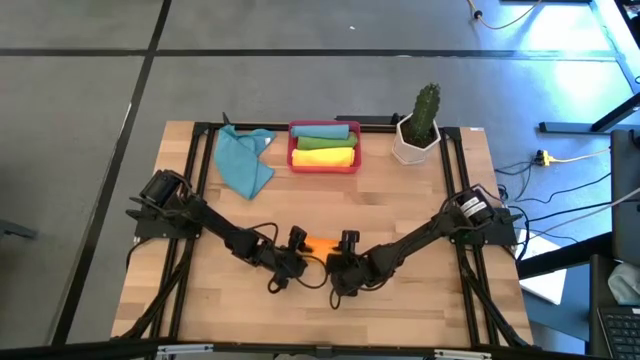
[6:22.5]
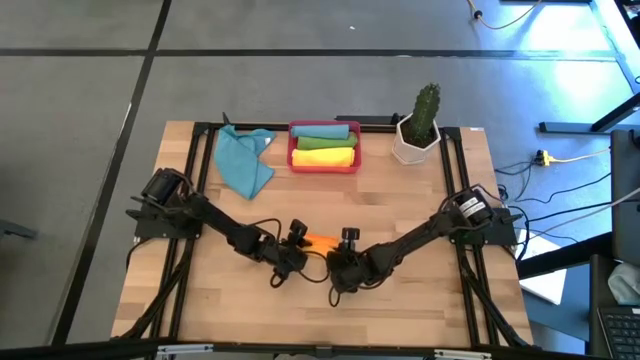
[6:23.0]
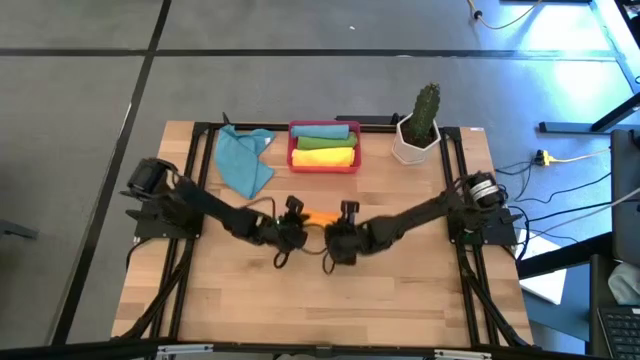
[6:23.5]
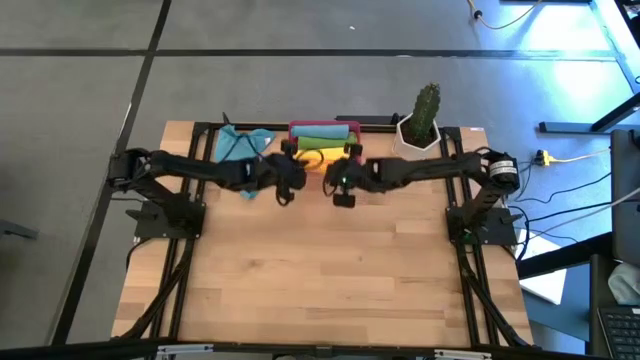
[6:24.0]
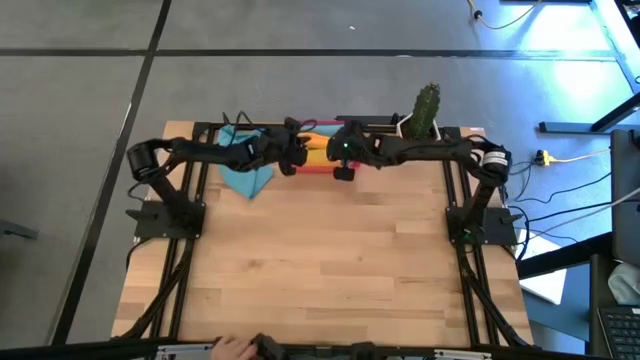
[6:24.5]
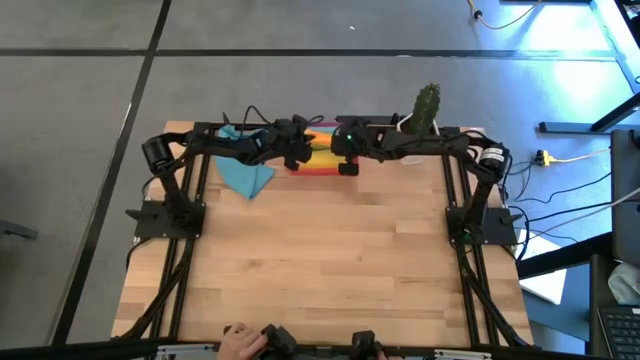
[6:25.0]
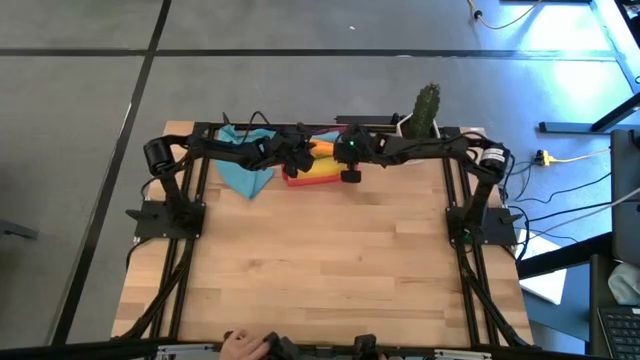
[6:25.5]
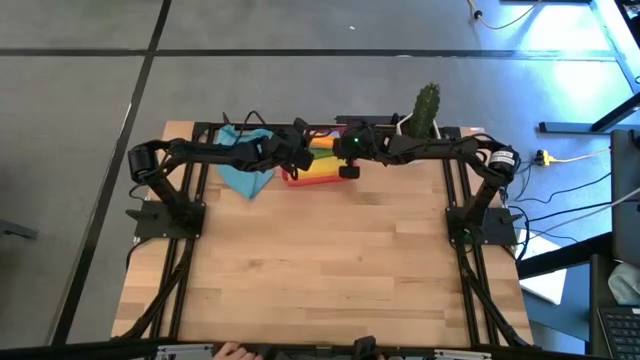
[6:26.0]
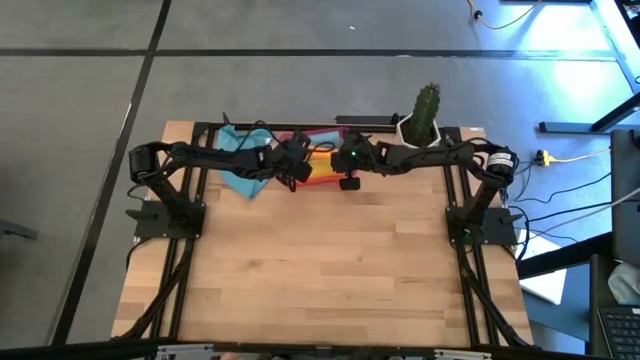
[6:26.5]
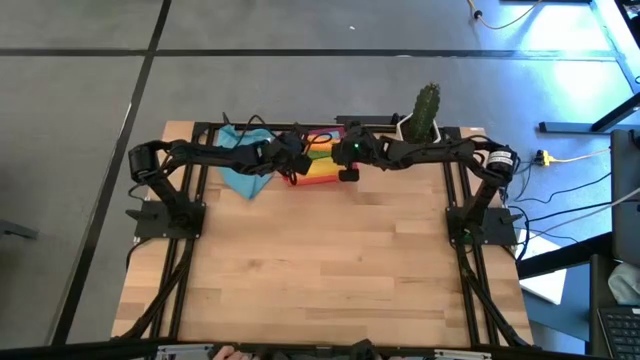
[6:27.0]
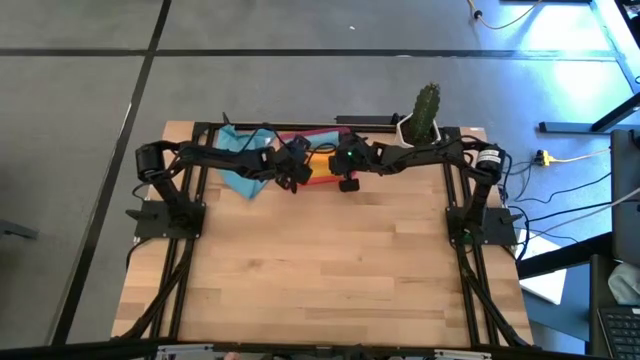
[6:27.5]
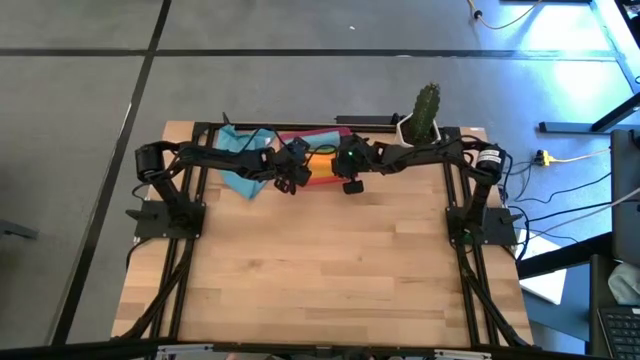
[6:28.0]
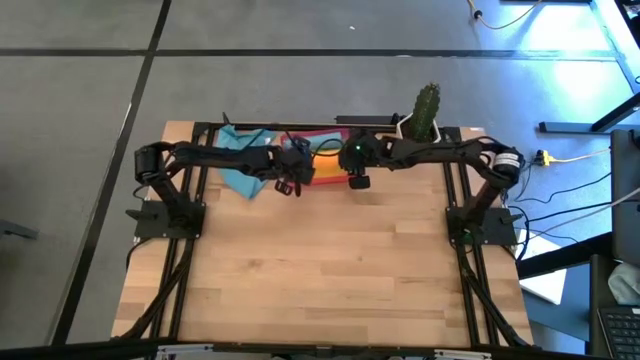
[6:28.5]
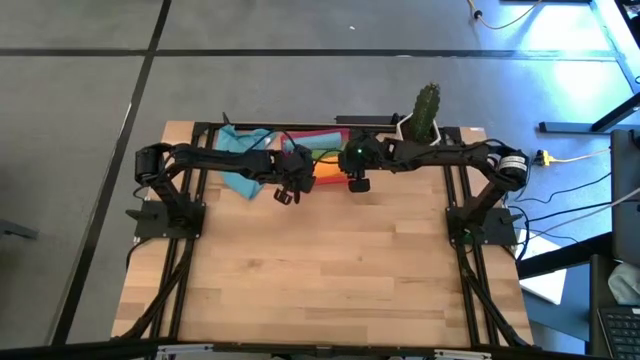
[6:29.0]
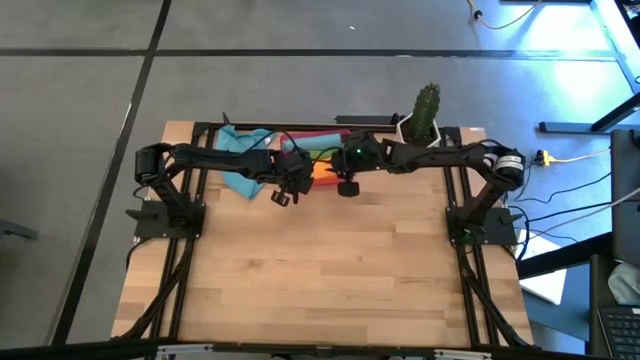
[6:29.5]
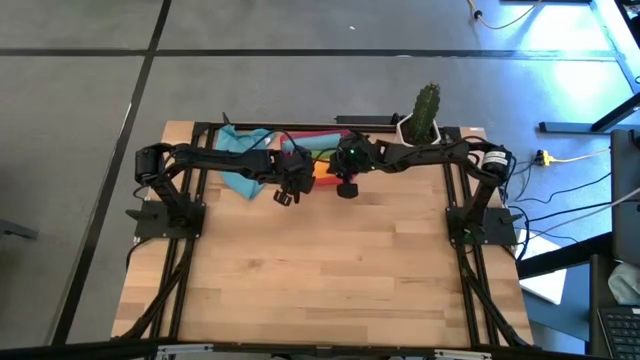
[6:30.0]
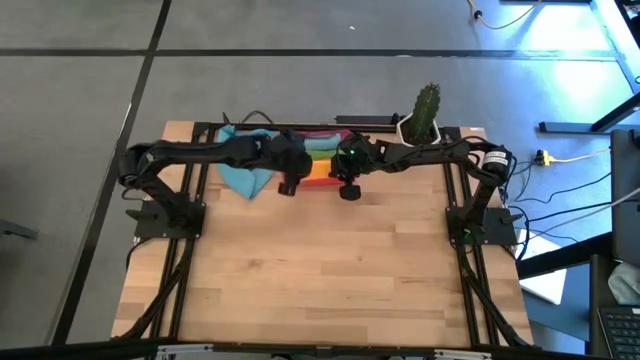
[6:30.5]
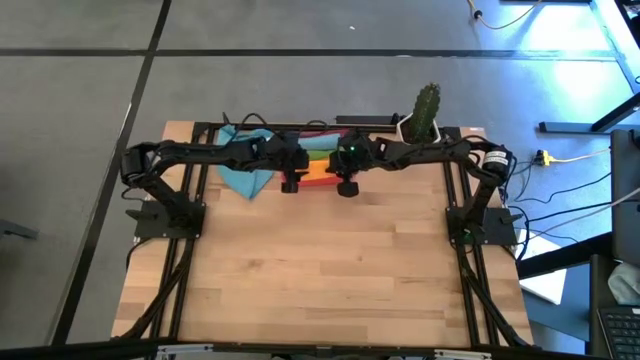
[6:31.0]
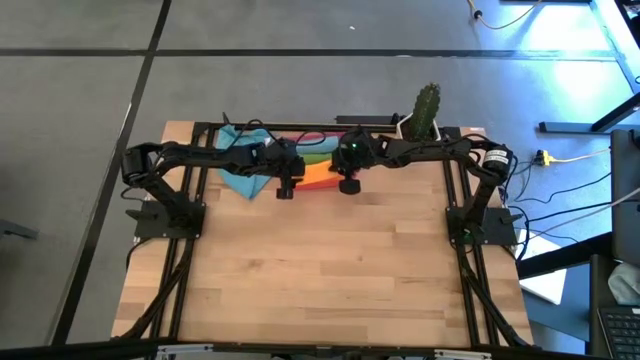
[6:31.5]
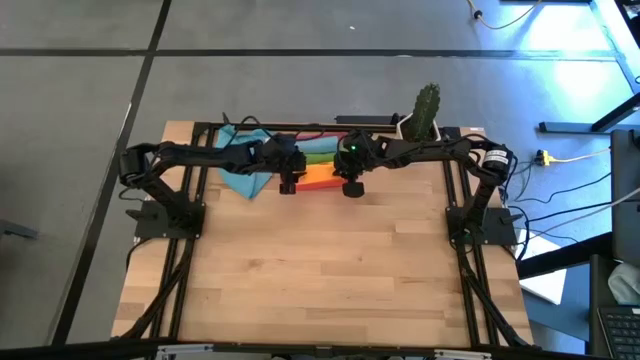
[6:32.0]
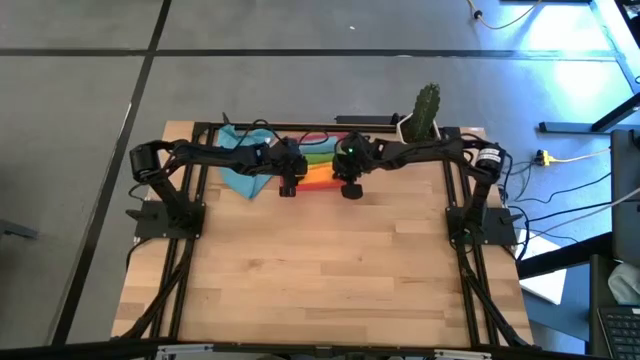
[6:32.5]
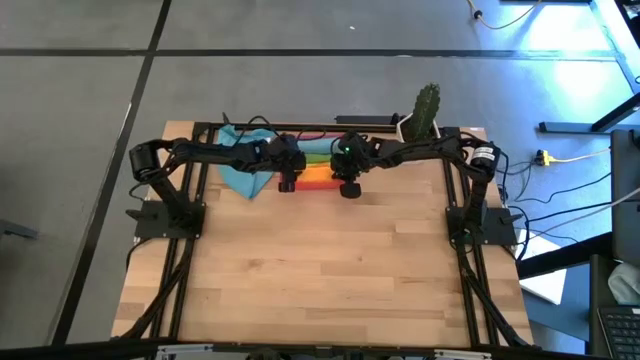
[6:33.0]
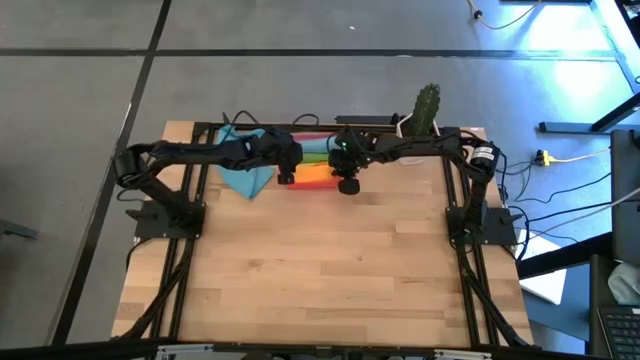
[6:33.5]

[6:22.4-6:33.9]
Task: Roll microfiber towels into tight, uniform cylinder then place into a basket
Put the rolled orange towel into the red bin

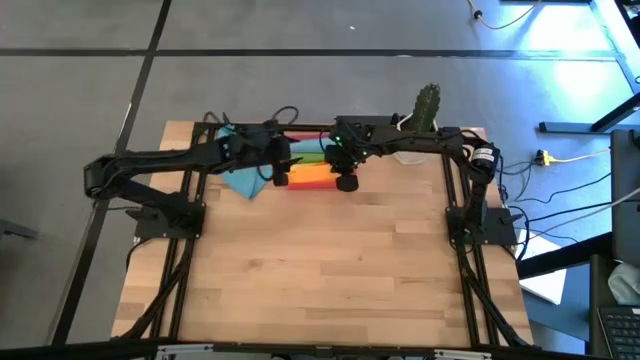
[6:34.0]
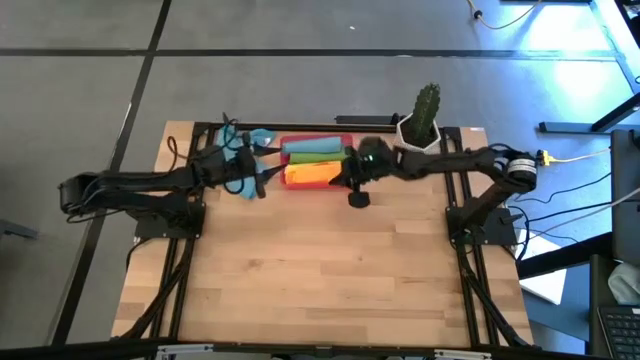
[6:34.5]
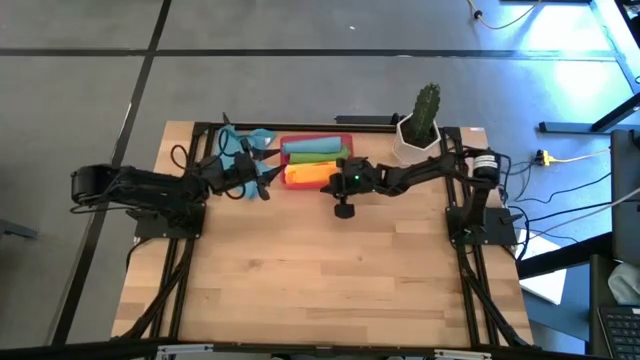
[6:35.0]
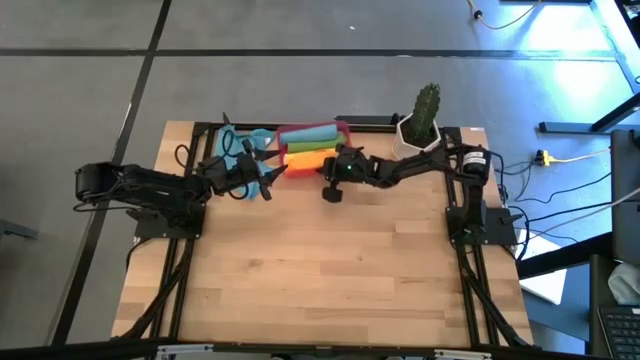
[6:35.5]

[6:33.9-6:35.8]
Adjust the red bin

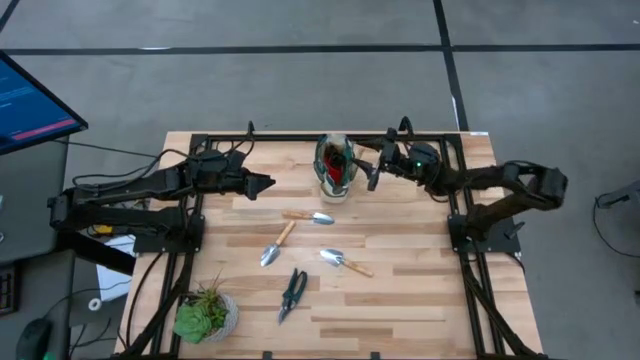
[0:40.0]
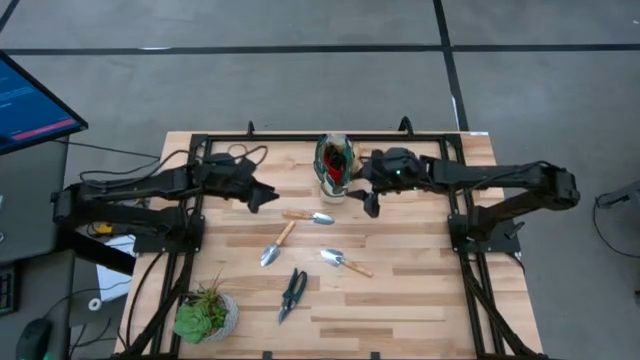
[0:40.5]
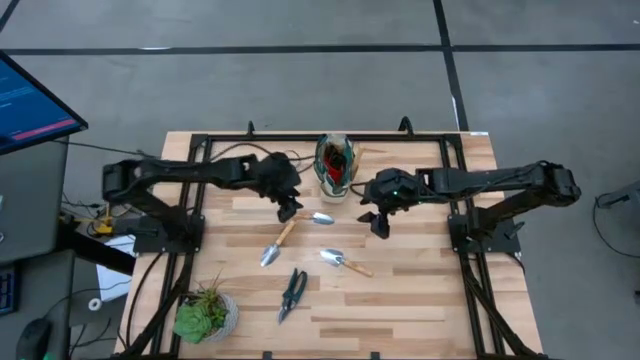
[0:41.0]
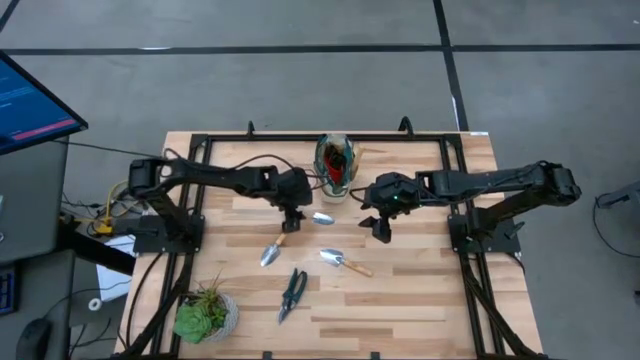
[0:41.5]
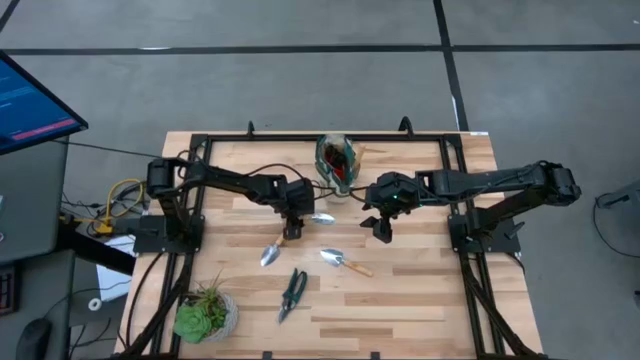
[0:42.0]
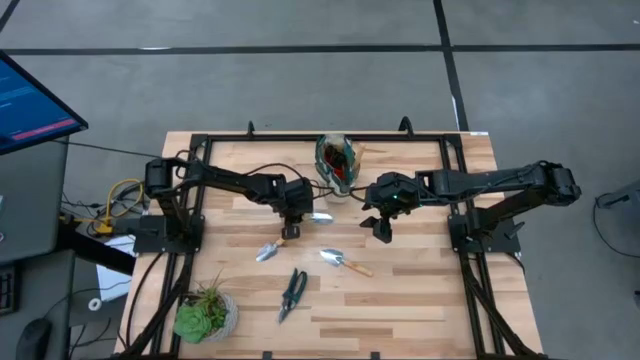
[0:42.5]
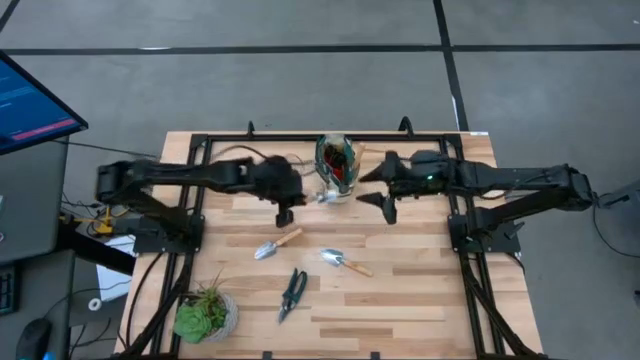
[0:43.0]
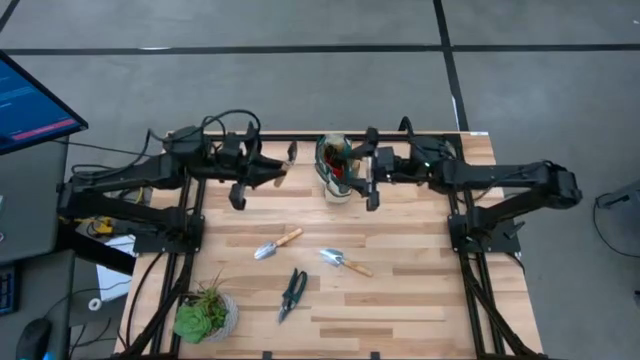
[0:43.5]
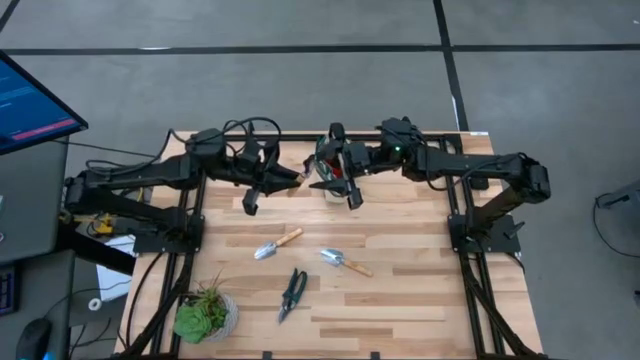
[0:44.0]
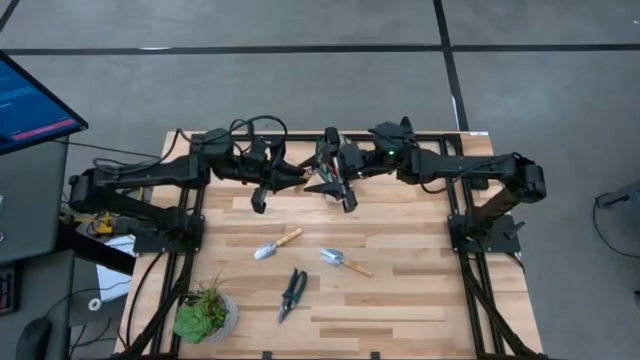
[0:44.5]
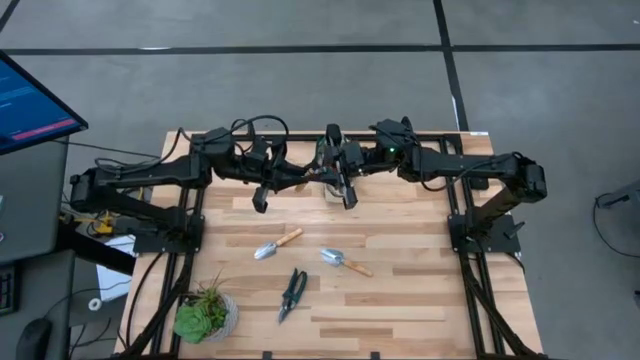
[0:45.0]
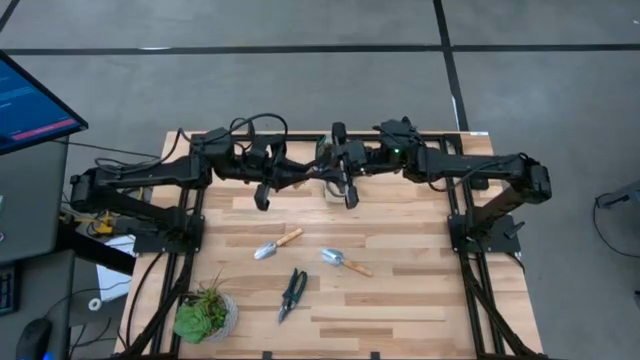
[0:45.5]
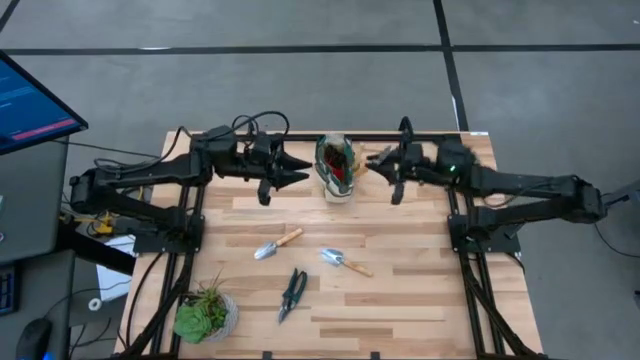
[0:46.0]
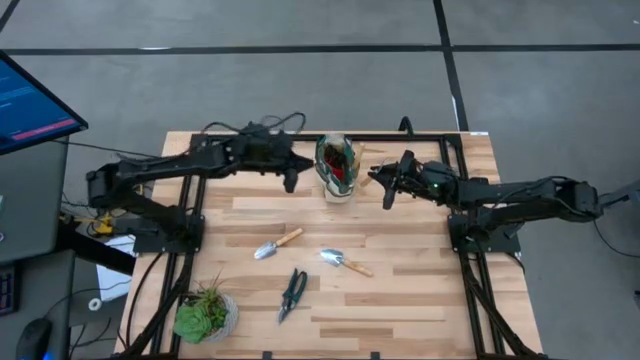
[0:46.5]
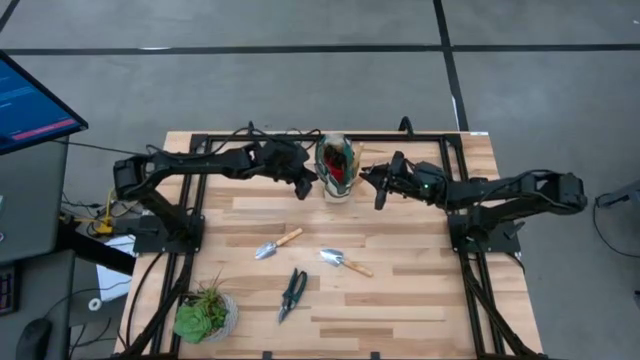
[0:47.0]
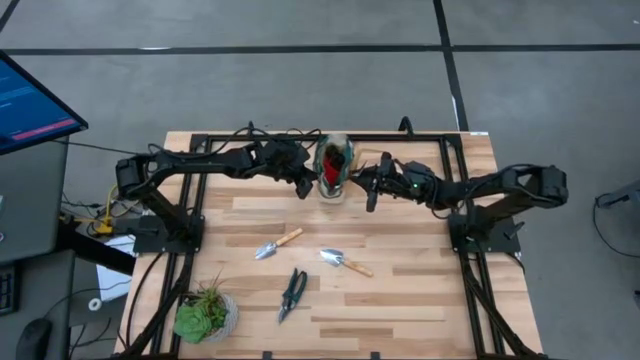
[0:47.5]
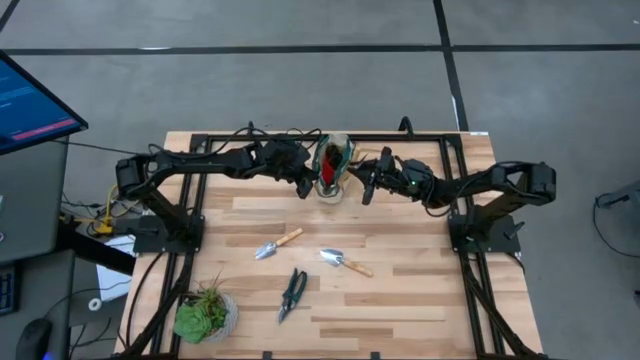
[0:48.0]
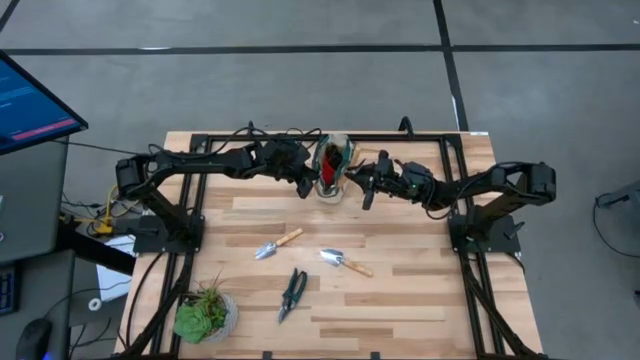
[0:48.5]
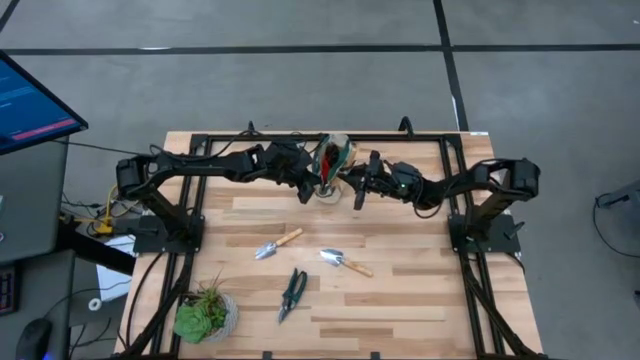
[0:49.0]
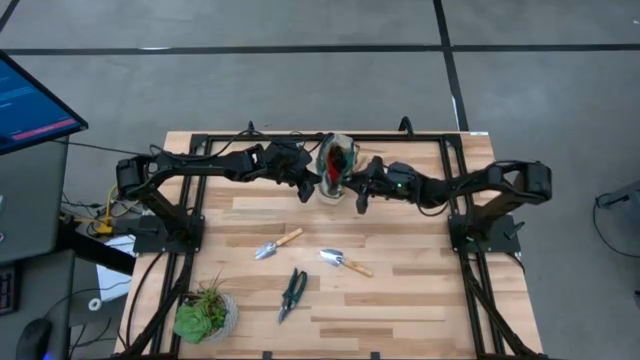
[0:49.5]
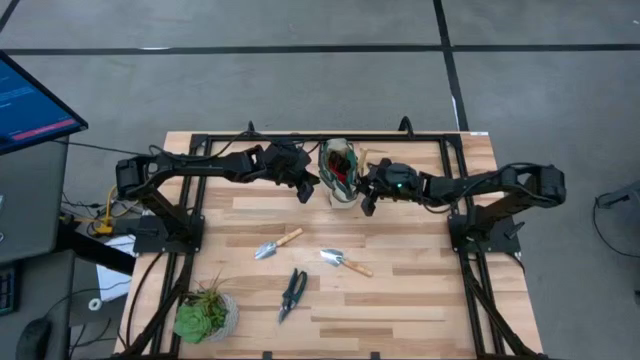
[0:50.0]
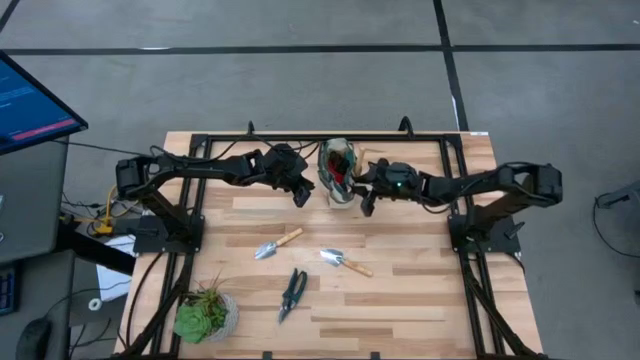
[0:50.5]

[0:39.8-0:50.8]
Task: Pick & Place Garden tools in Gardening bag
Put the trowel into the gardening bag
